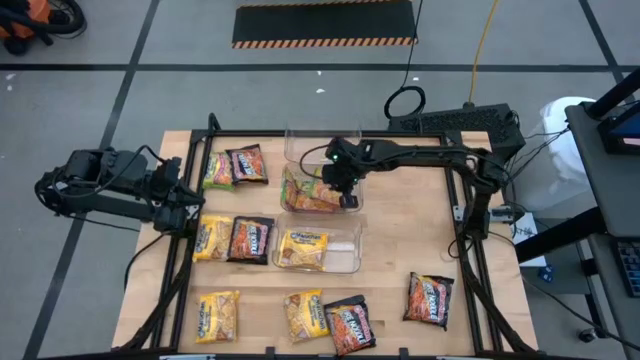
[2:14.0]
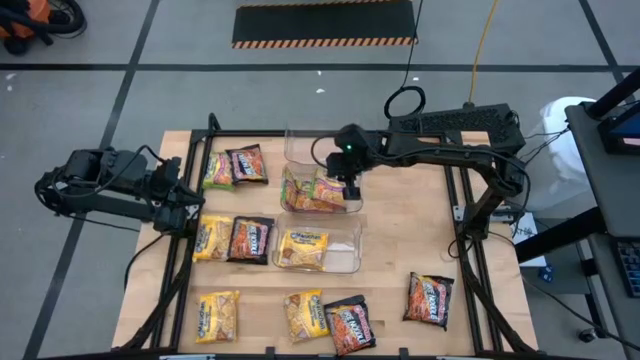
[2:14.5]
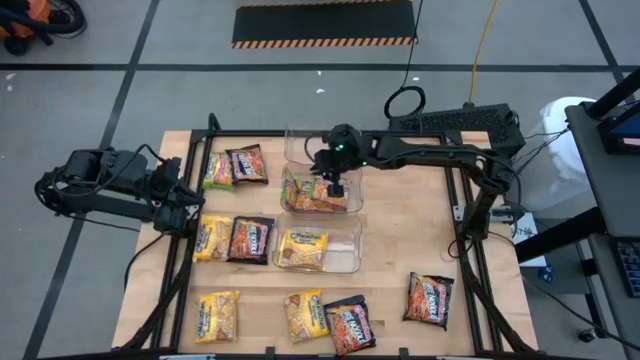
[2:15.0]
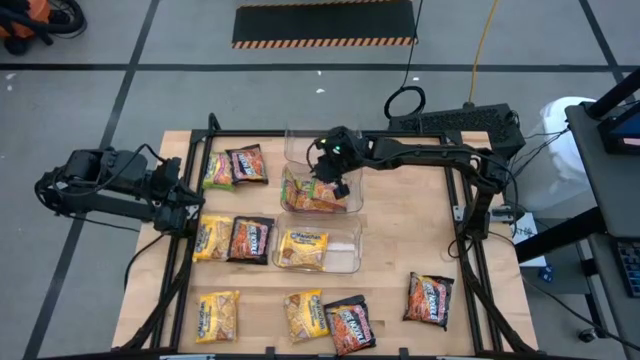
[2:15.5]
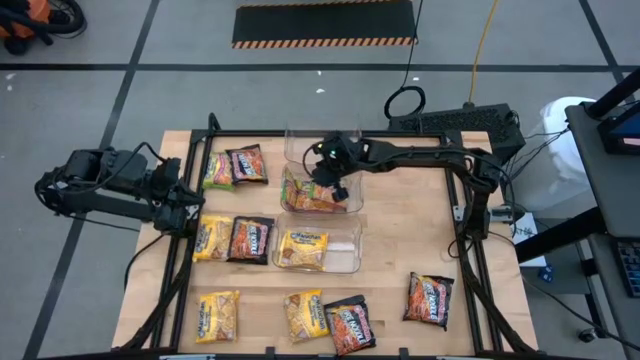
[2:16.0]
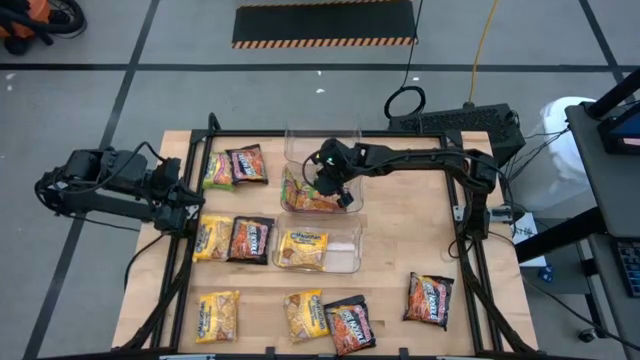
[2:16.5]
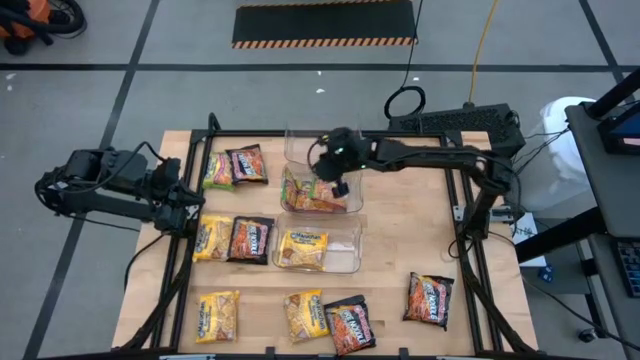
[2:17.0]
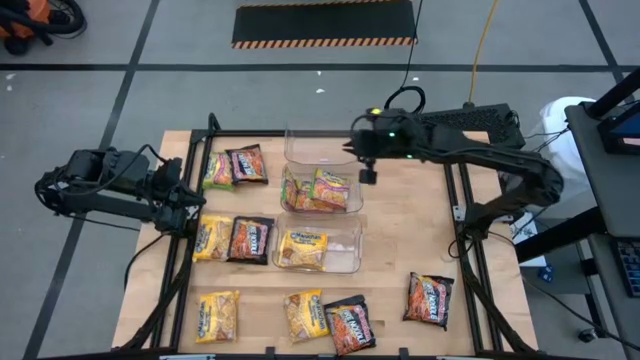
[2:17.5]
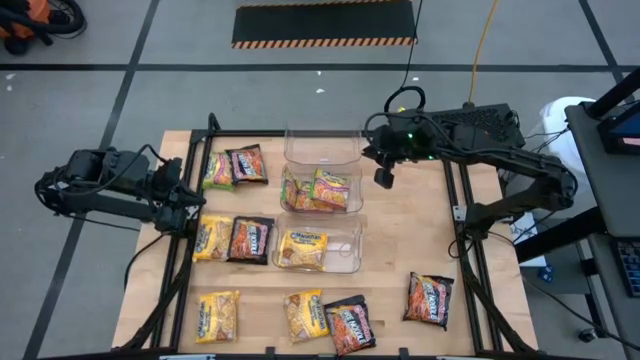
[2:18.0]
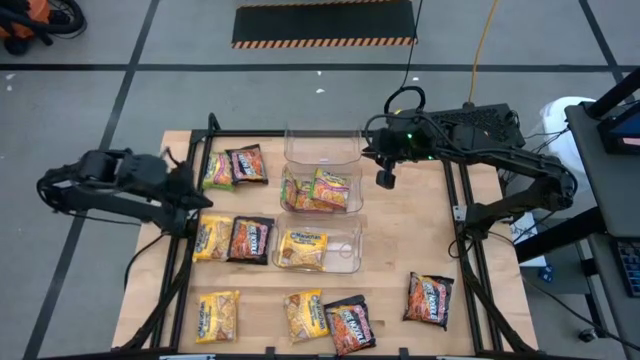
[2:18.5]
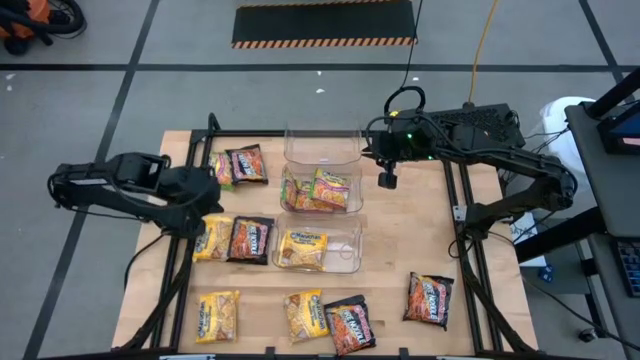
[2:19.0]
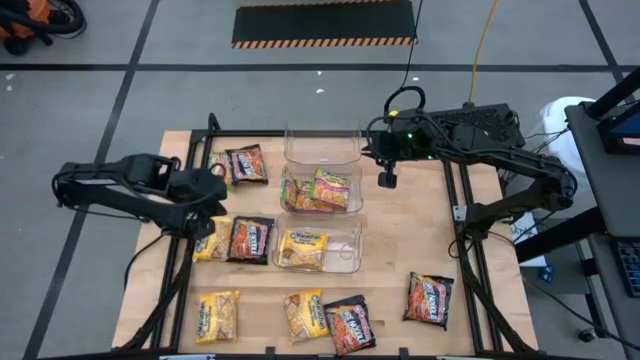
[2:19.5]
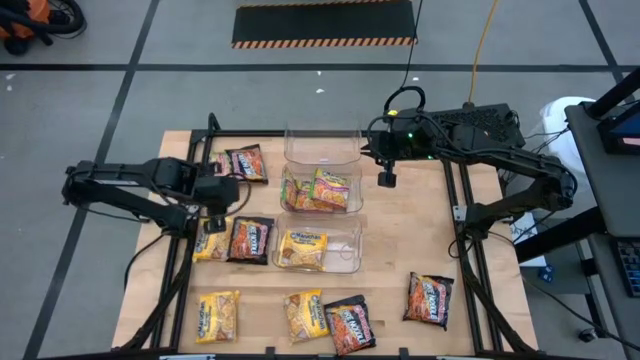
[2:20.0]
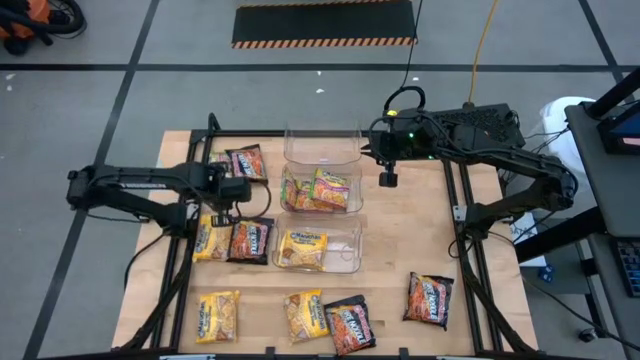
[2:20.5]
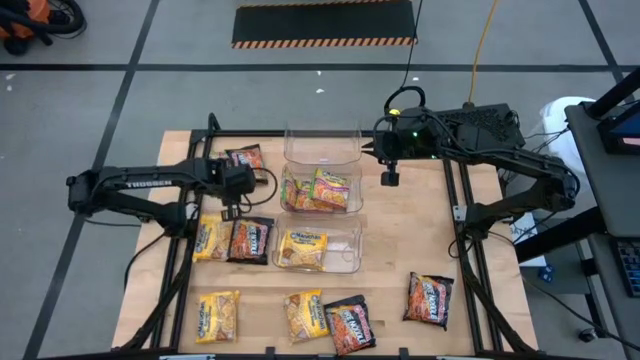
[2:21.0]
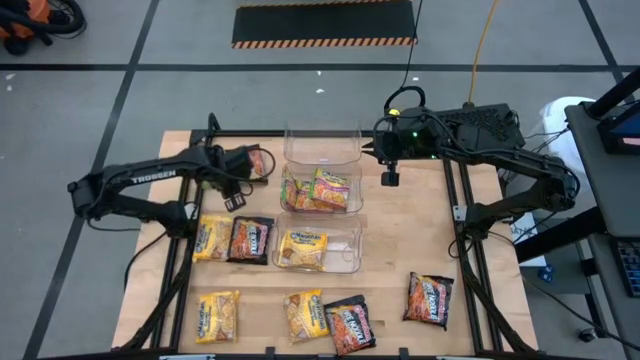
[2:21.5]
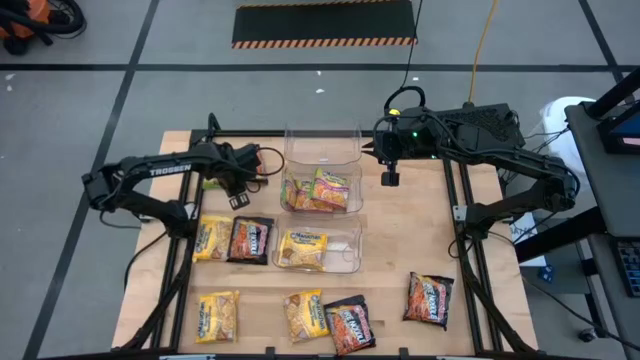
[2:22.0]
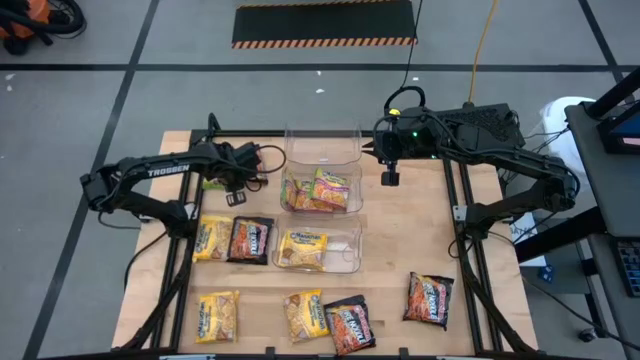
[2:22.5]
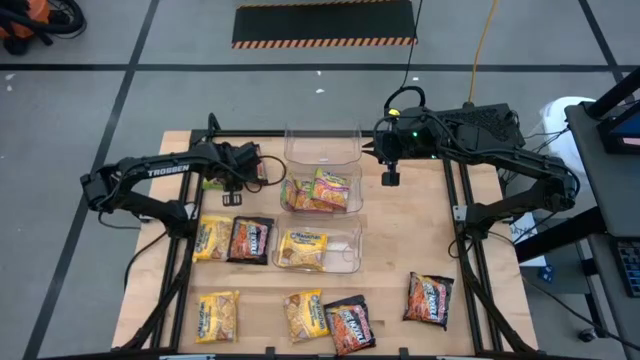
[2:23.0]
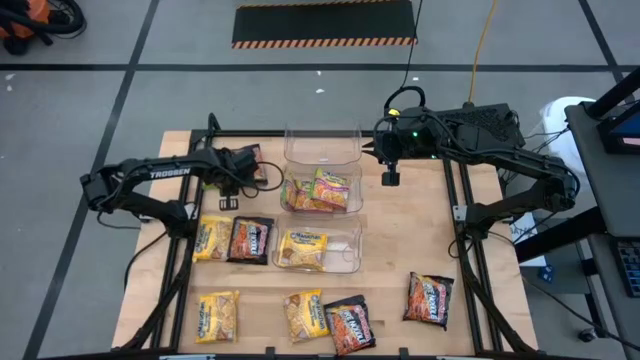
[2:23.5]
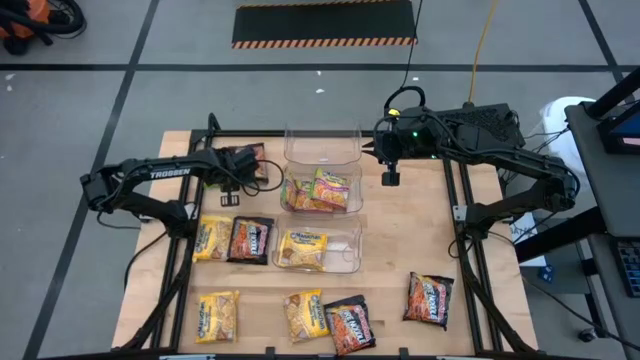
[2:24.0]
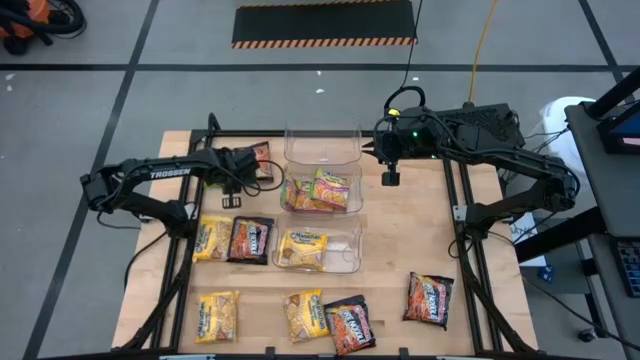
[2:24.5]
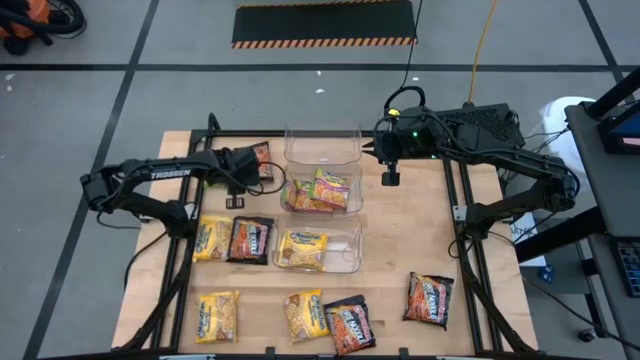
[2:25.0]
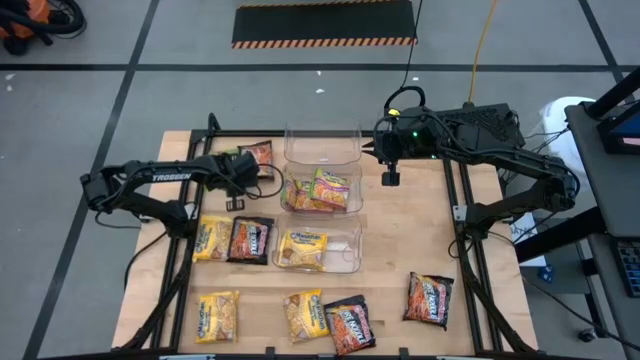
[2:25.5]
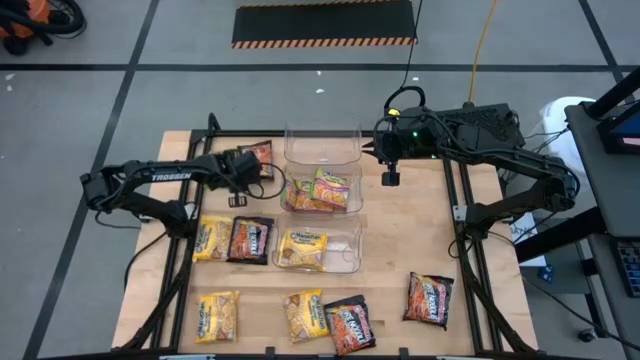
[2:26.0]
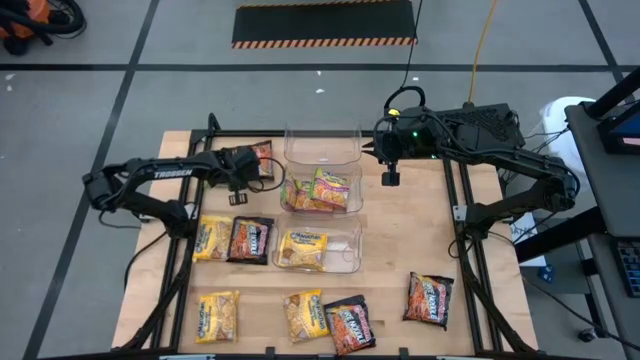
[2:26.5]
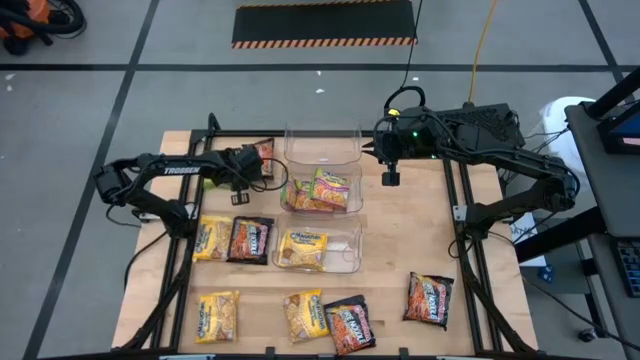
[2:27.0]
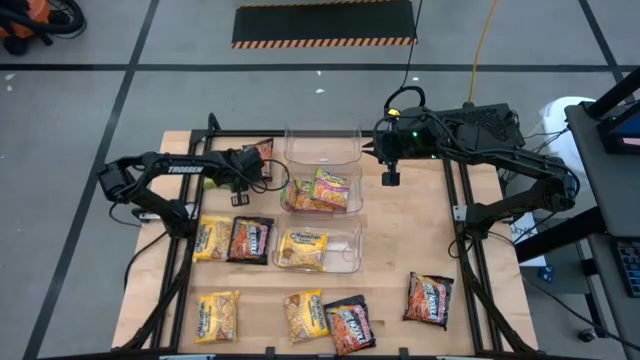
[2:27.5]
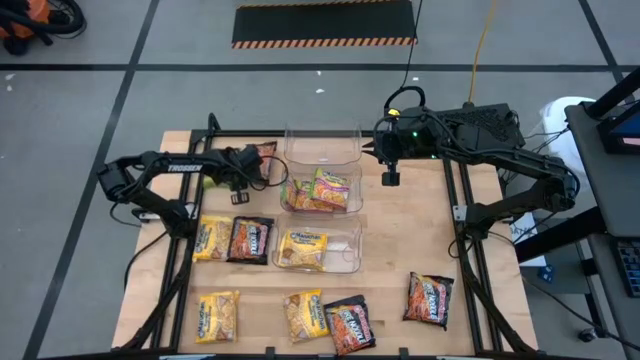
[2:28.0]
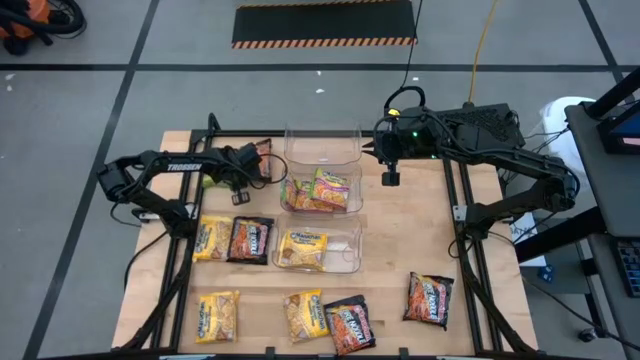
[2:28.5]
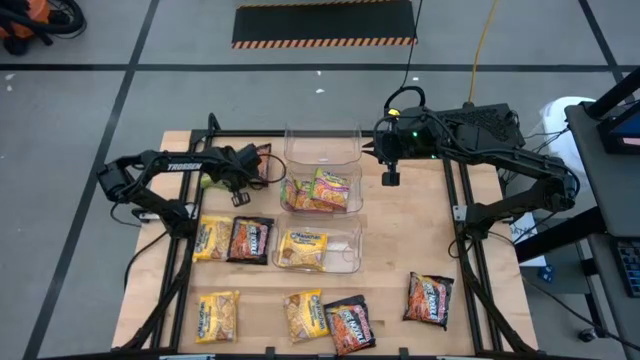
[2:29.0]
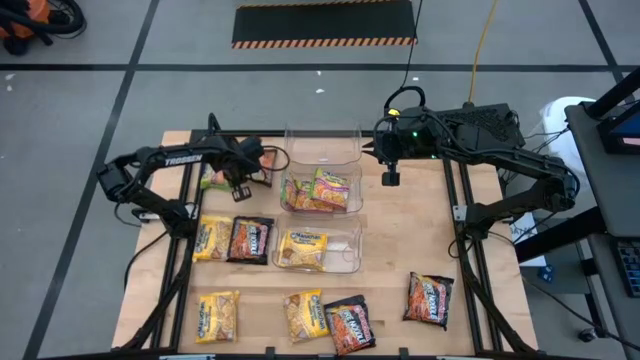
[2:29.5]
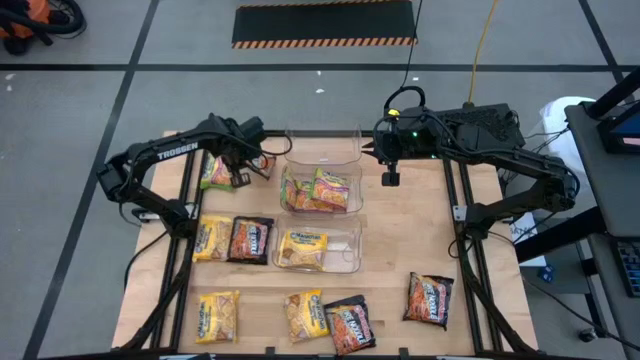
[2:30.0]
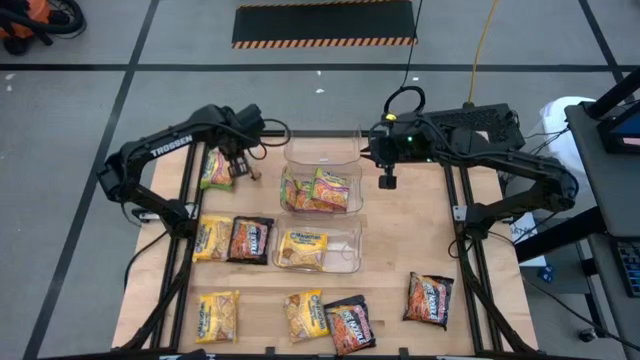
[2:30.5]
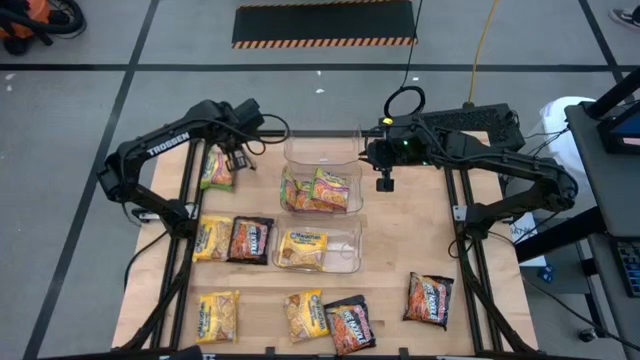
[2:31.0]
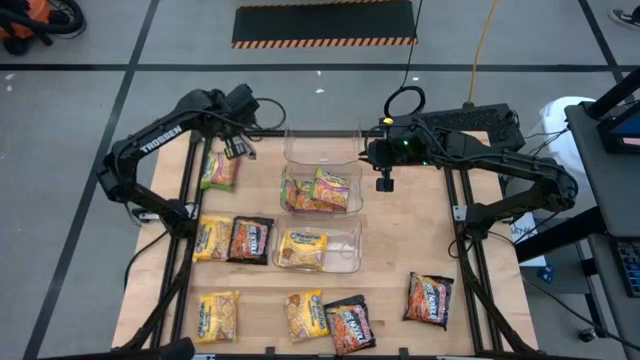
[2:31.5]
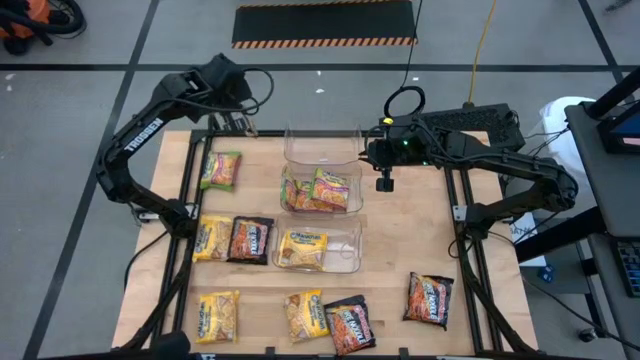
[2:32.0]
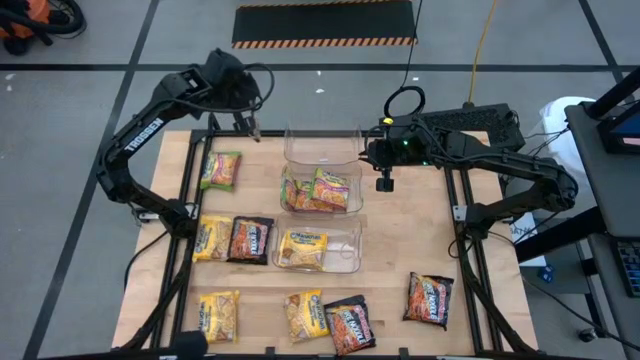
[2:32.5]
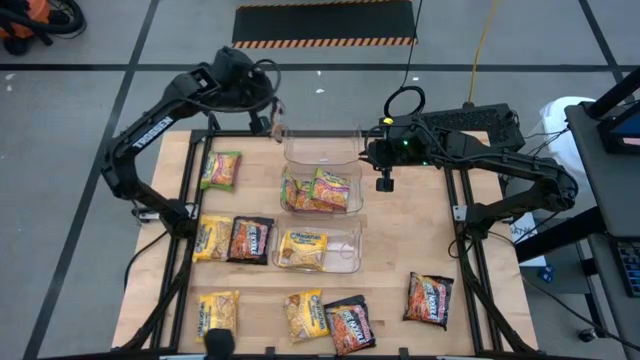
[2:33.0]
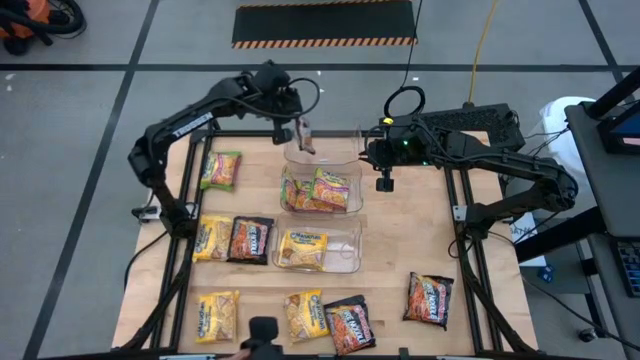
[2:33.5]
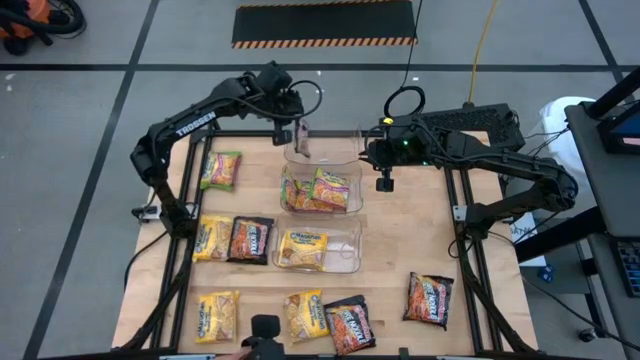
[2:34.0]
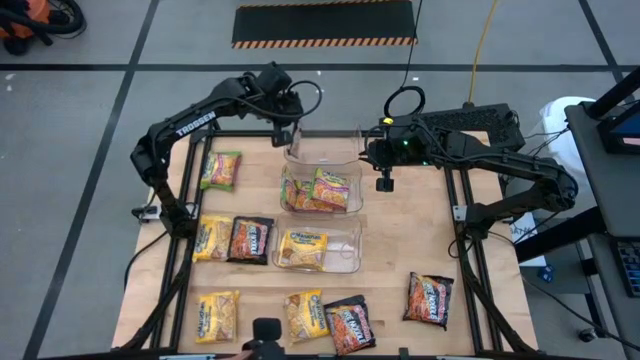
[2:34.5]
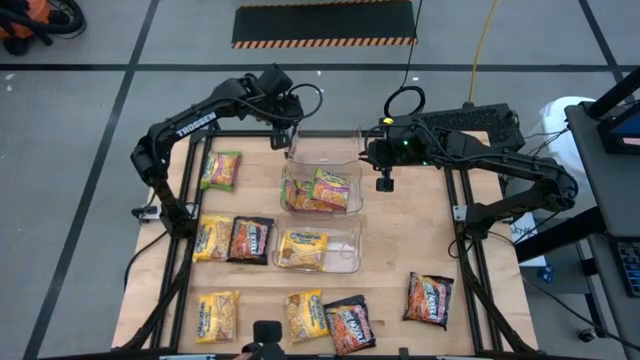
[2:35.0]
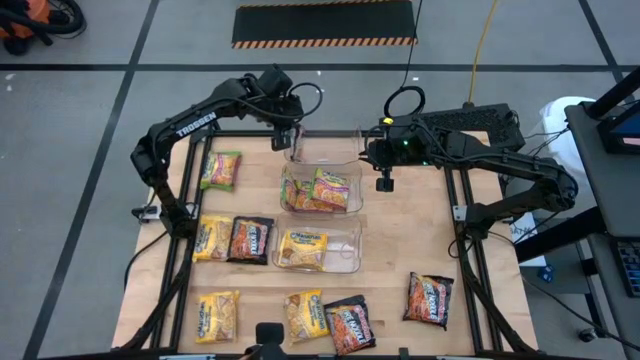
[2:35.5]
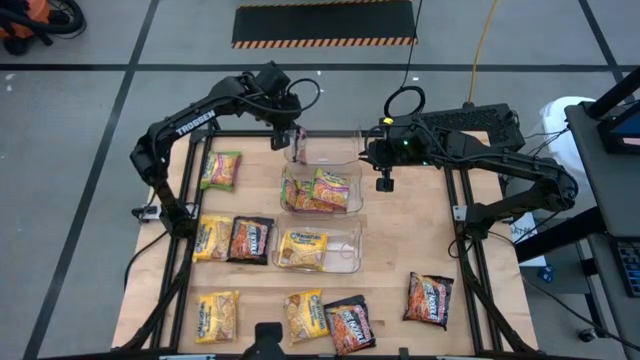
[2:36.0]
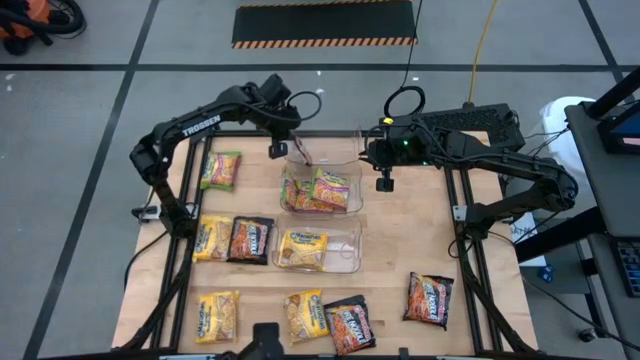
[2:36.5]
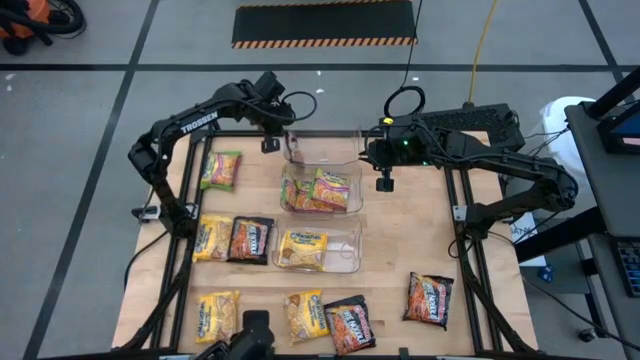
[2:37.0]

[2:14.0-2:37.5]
Task: Sort Maruchan noodles
Put the black noodle pack into the top transparent bin
